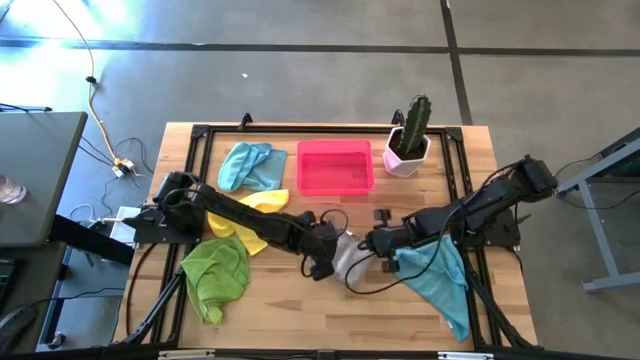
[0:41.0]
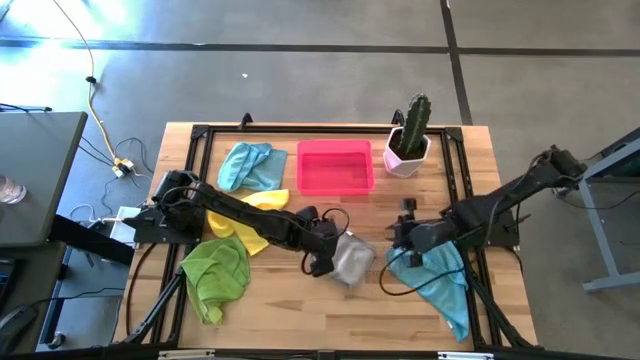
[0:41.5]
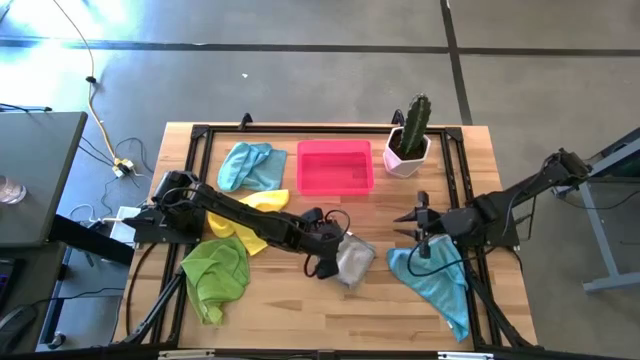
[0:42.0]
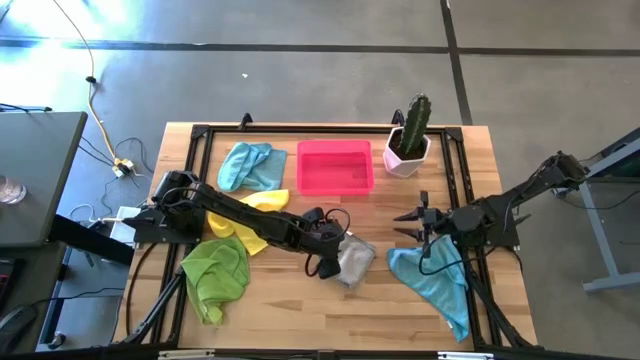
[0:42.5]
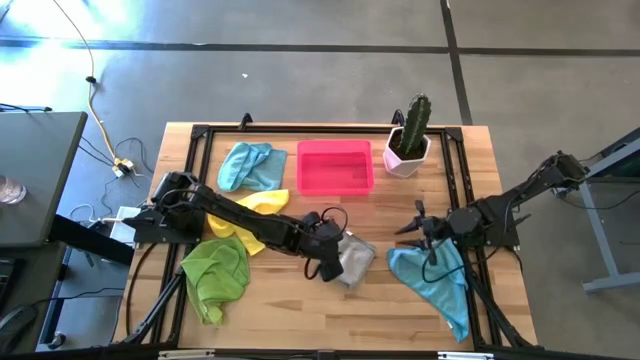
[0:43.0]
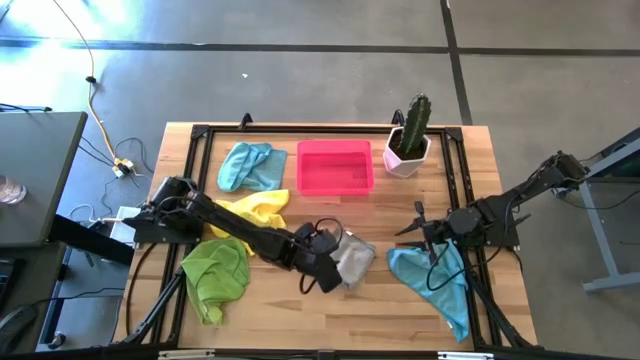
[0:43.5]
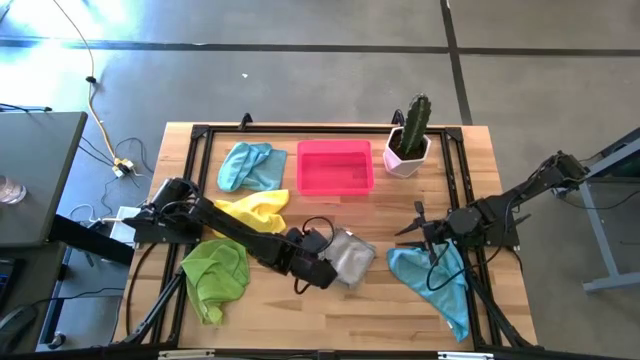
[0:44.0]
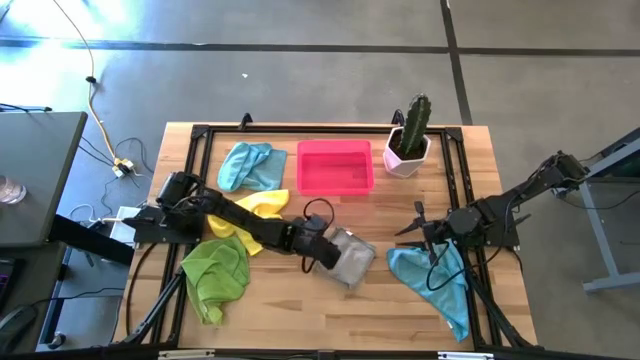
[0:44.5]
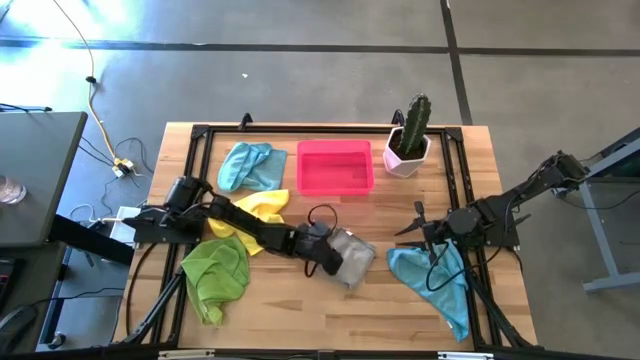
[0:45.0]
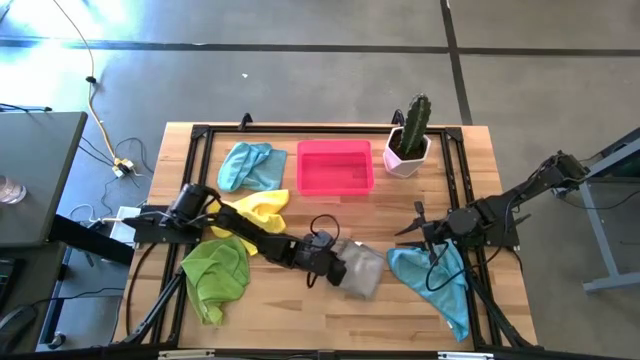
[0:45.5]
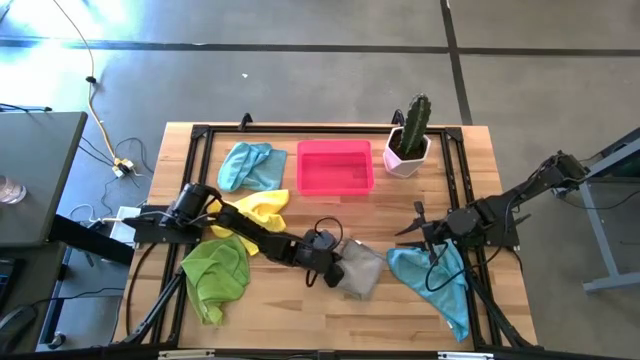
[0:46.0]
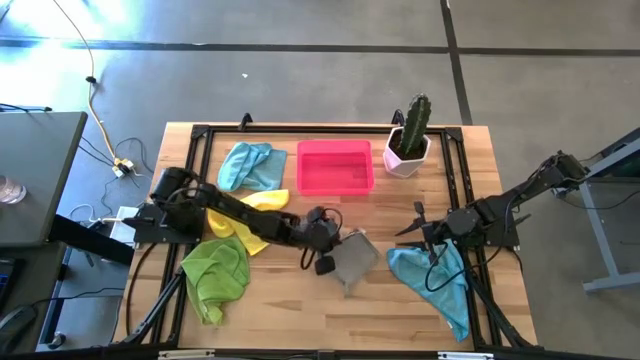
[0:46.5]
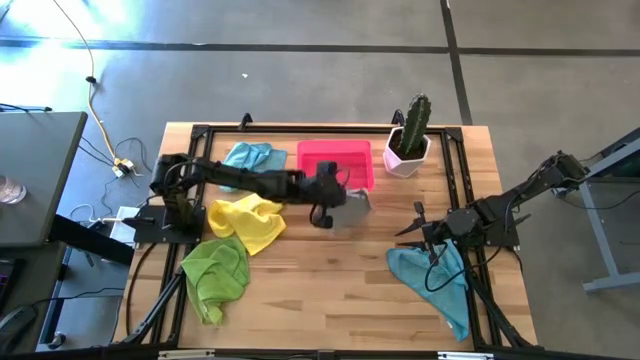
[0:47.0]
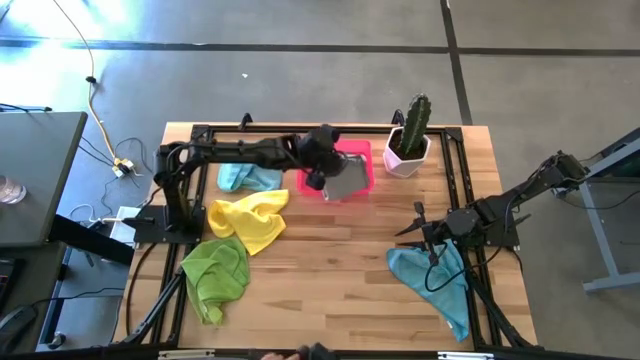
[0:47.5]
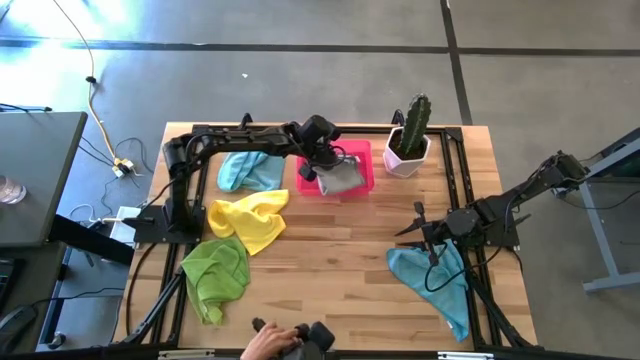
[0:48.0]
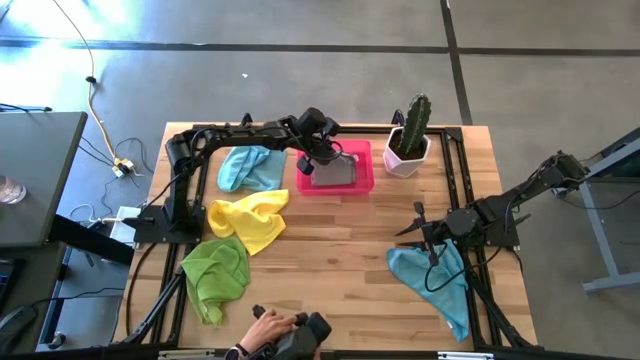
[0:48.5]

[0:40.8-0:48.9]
Task: Fold microfiber towels
Put the gray microfiber cloth into the pink bin

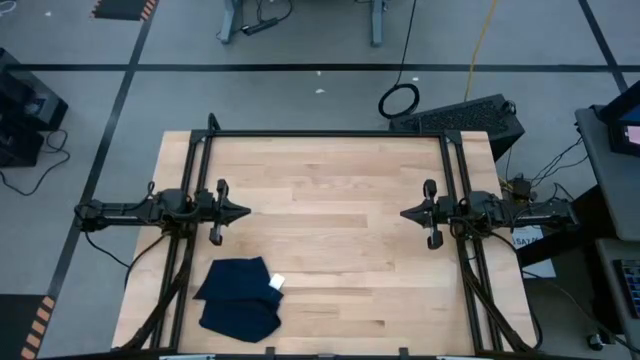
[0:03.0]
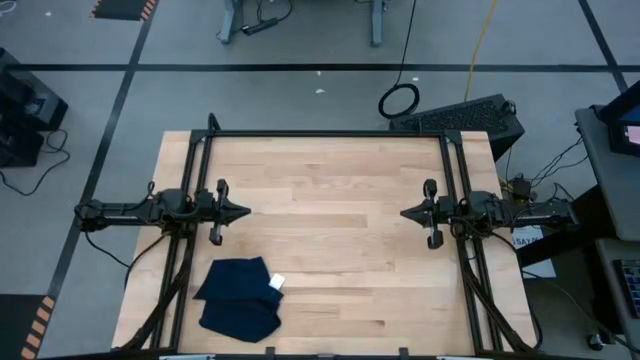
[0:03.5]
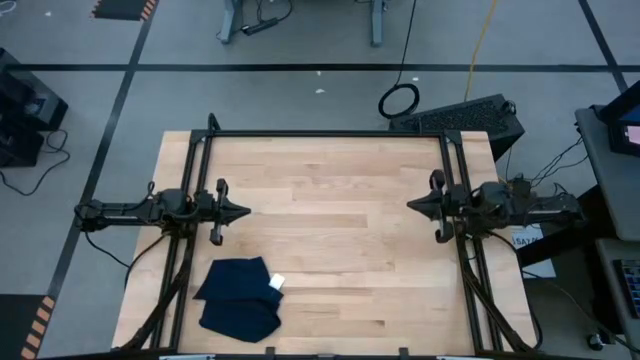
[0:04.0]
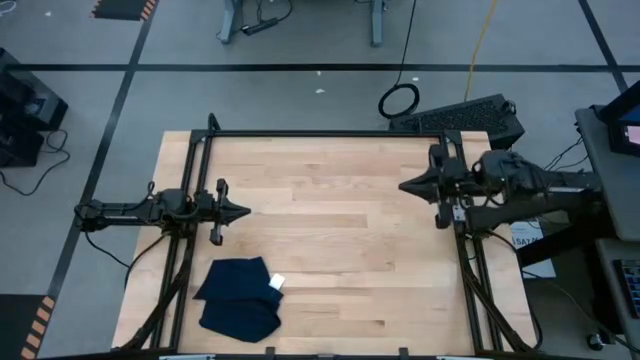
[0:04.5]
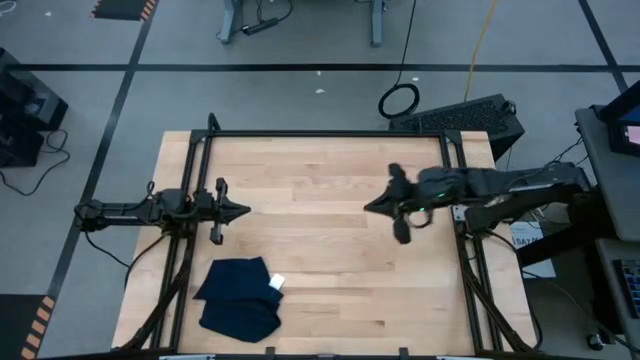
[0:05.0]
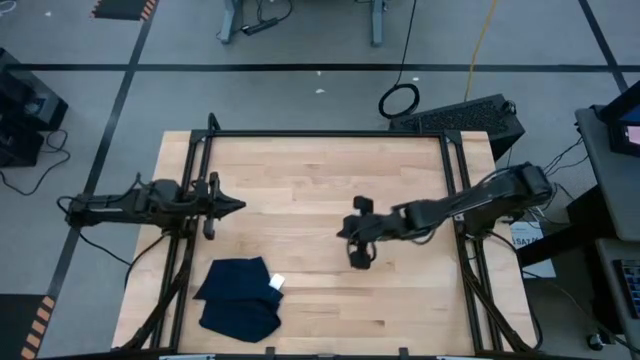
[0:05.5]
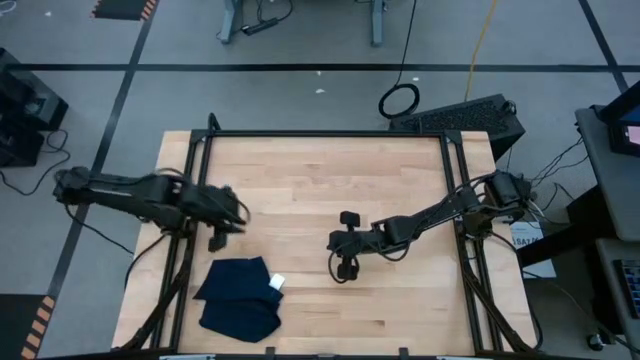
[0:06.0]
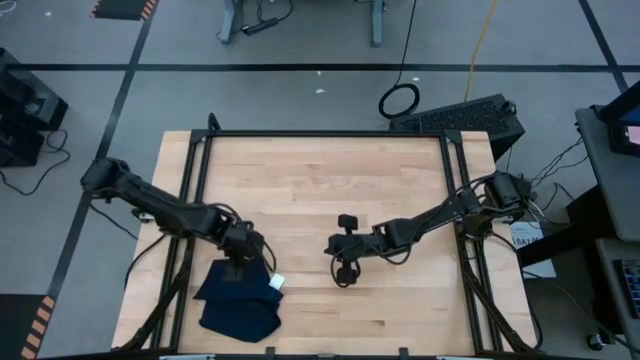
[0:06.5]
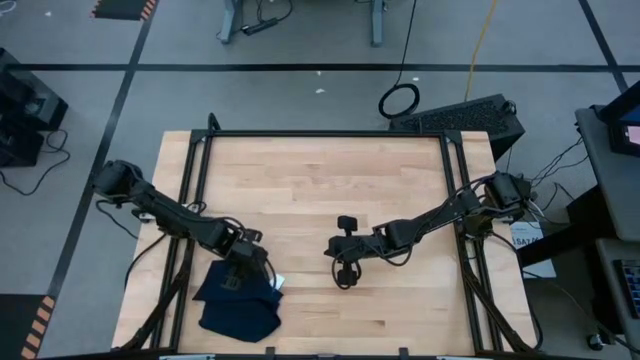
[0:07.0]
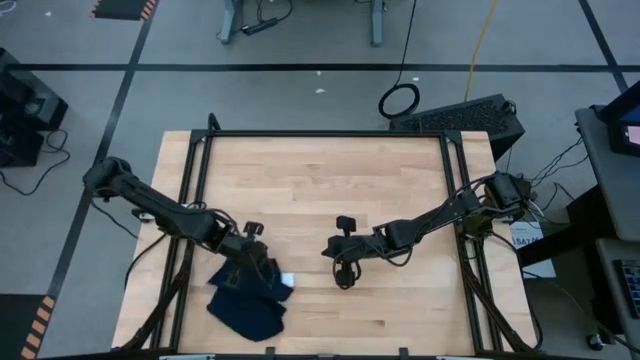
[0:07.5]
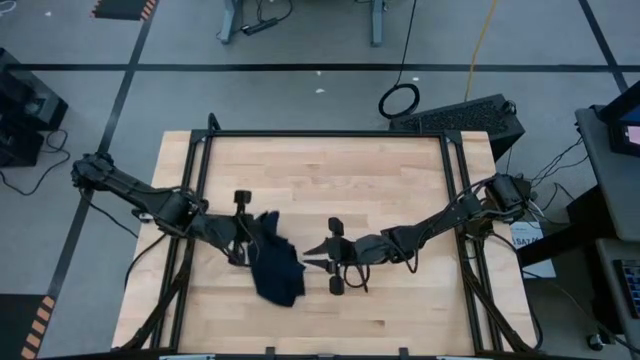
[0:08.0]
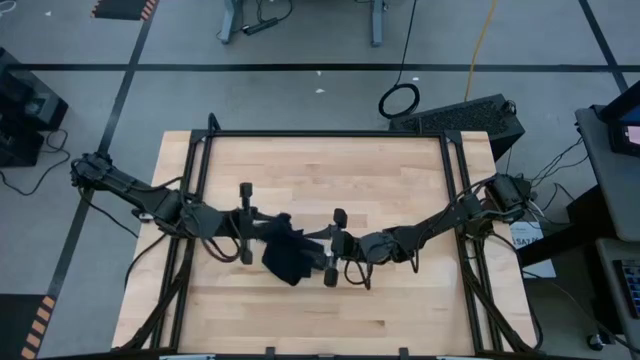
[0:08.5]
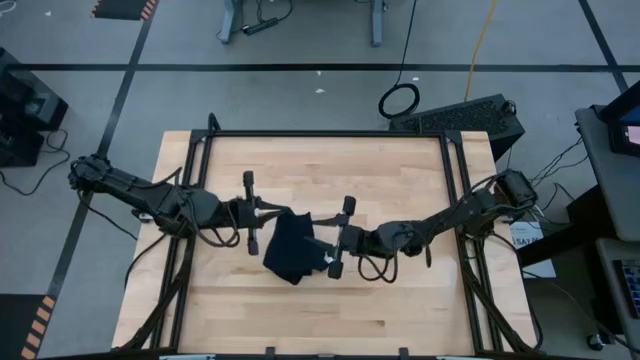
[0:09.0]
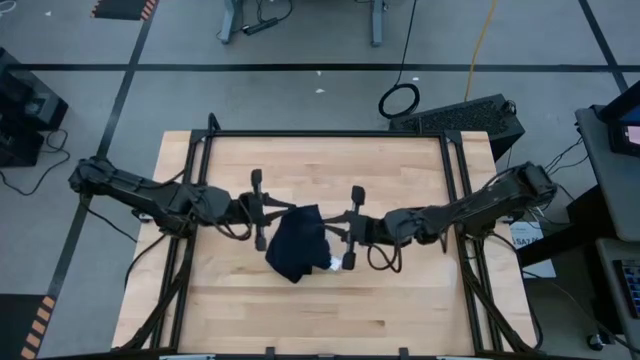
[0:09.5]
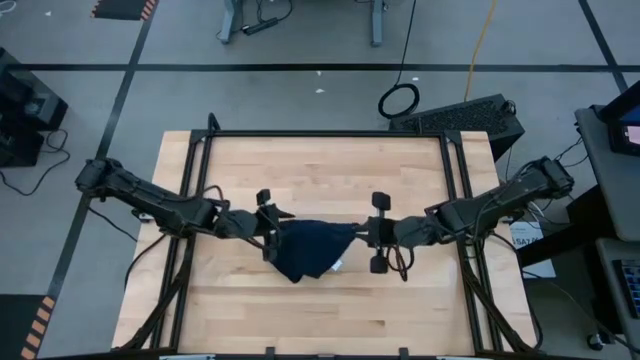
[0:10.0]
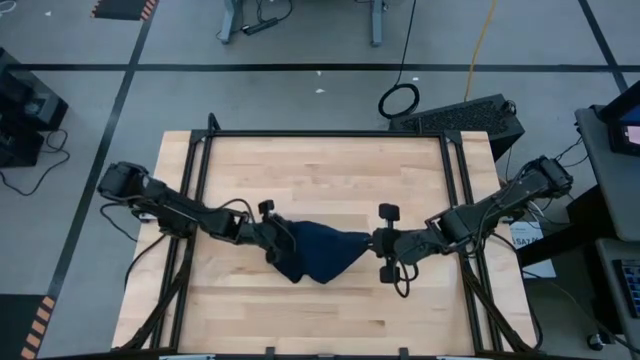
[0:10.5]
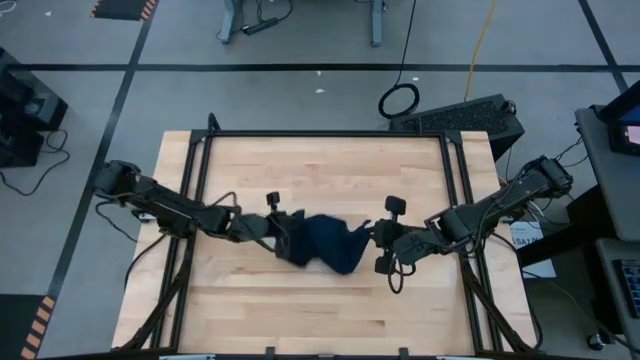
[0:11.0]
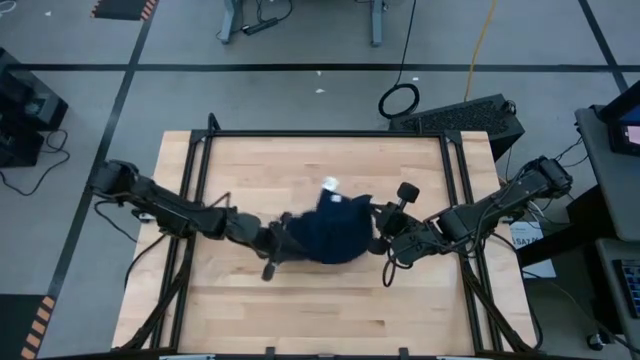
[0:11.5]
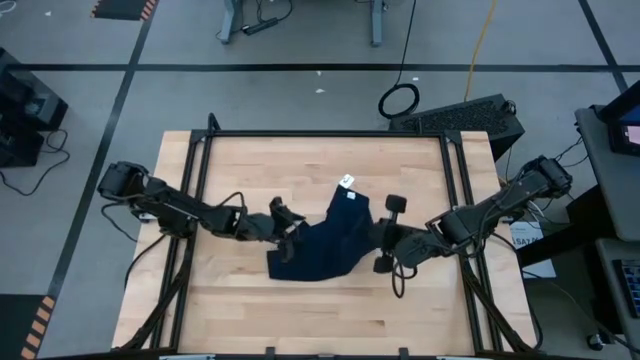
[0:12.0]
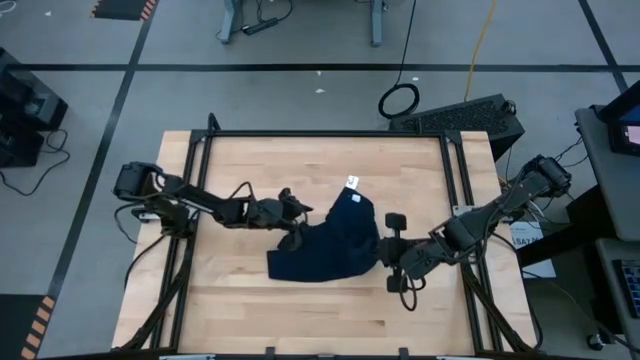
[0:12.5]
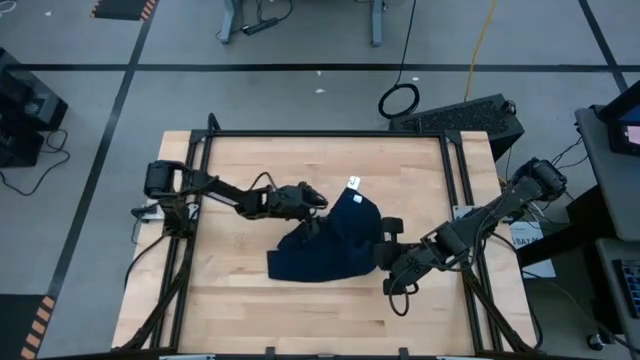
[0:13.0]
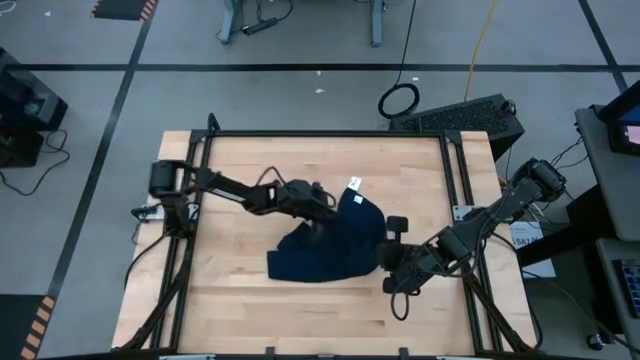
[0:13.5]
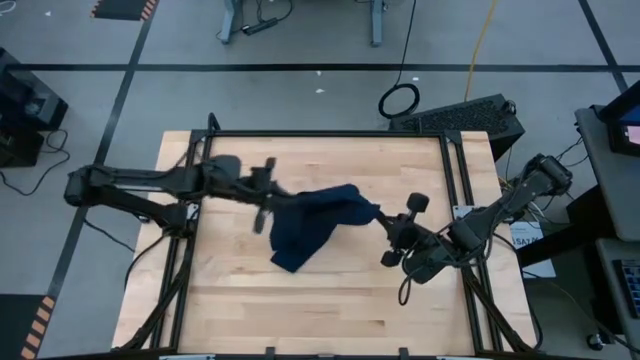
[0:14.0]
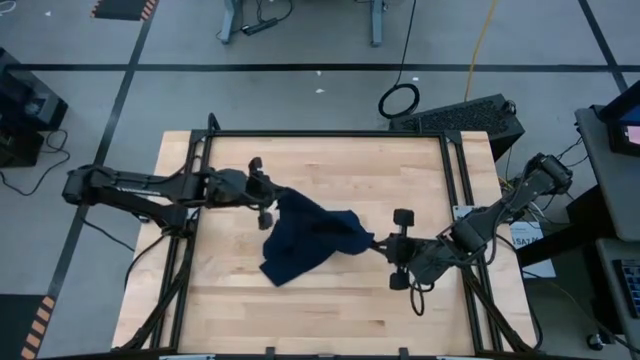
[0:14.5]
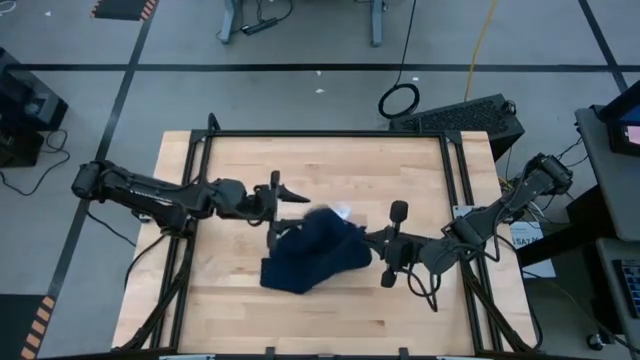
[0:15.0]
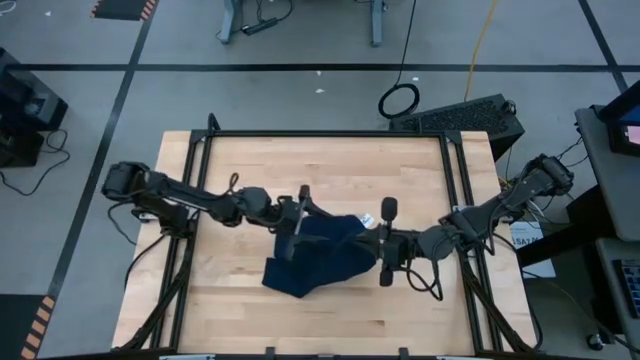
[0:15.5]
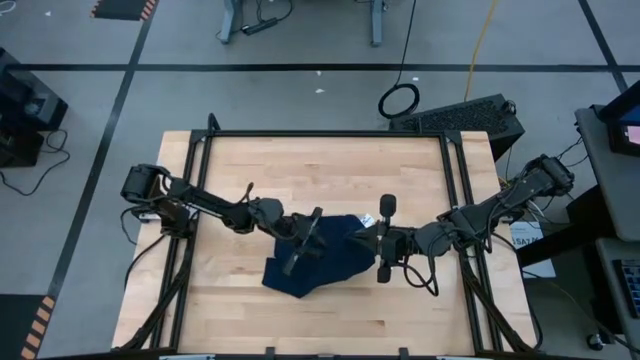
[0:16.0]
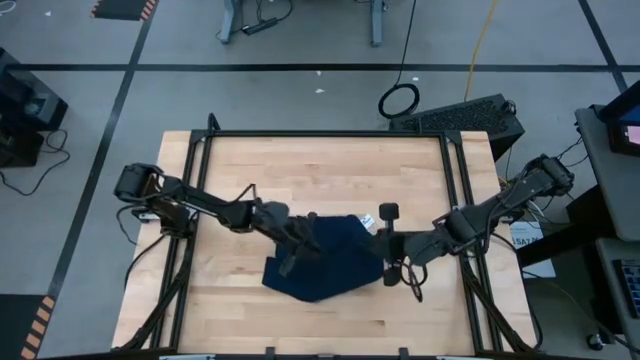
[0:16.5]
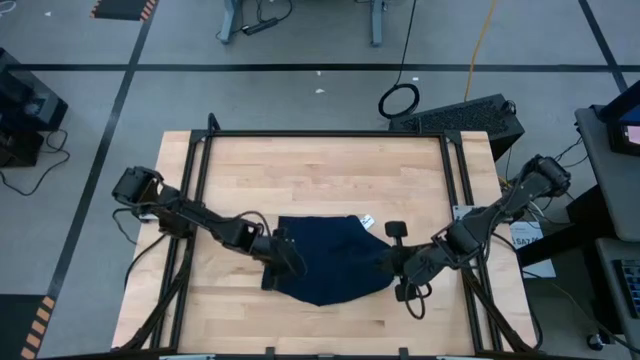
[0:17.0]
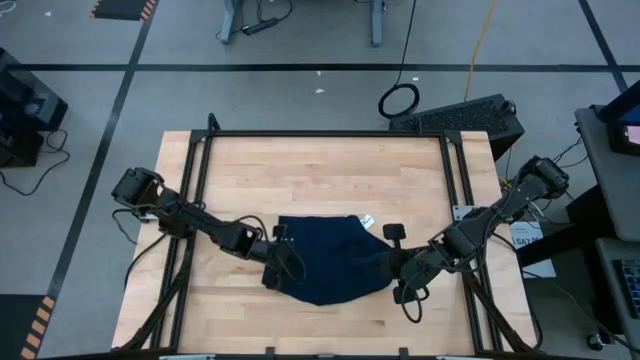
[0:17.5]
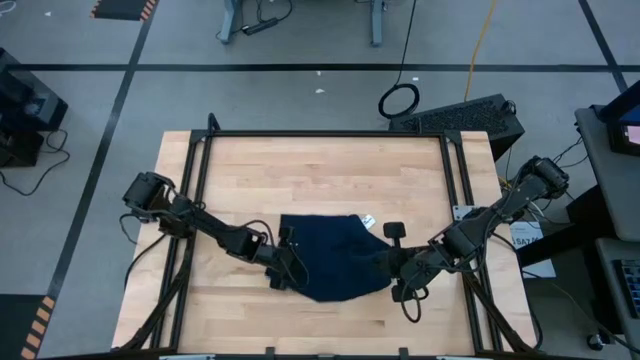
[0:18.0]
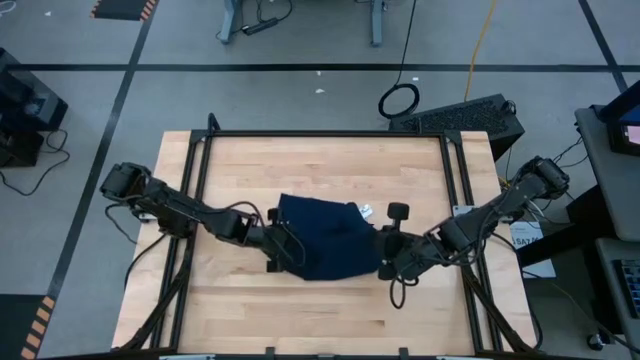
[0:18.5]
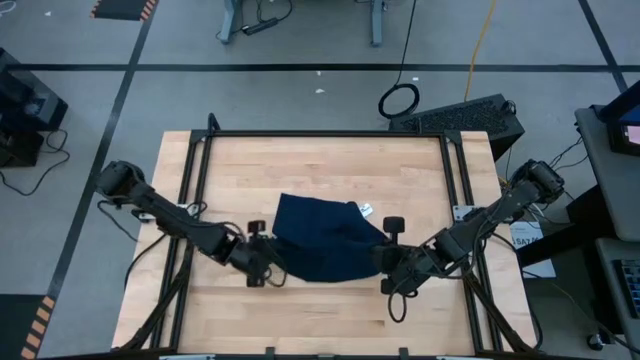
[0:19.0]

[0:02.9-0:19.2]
Task: Roll towel
Roll the dark blue towel
